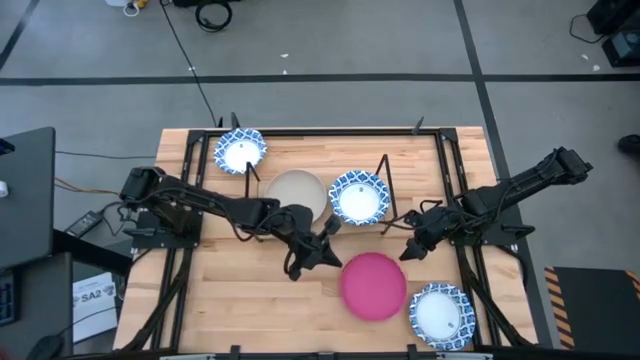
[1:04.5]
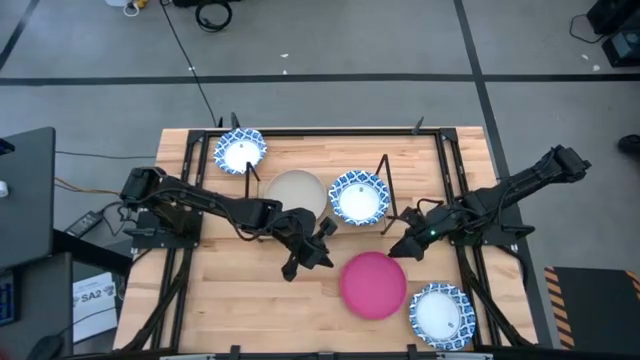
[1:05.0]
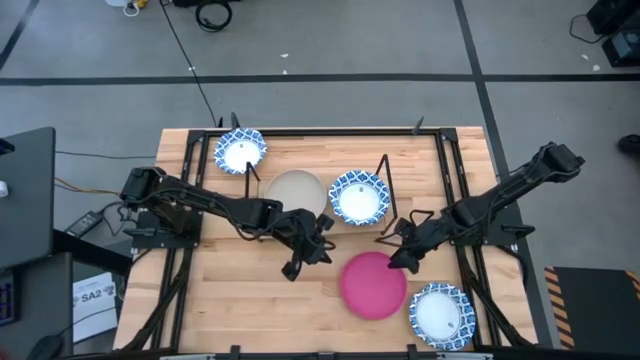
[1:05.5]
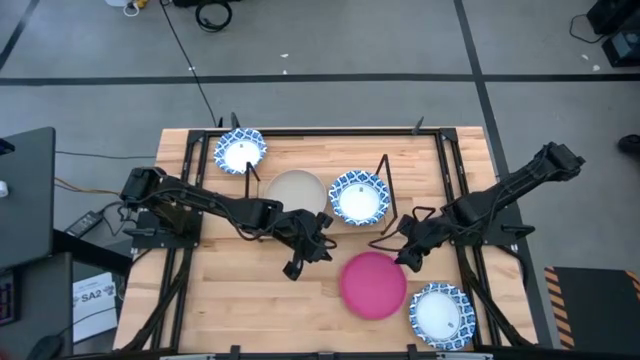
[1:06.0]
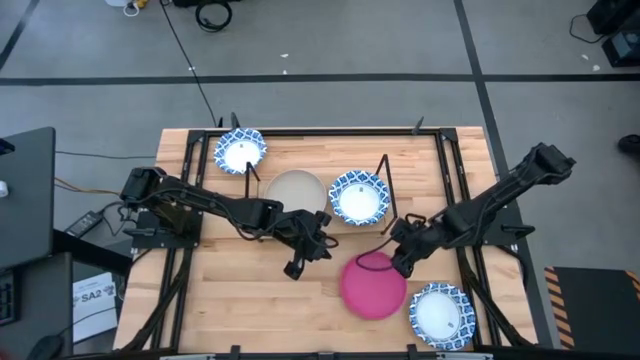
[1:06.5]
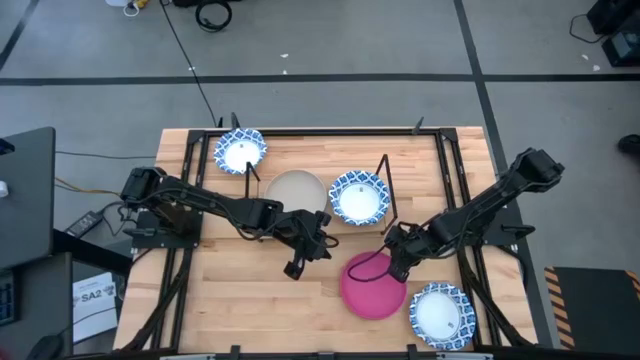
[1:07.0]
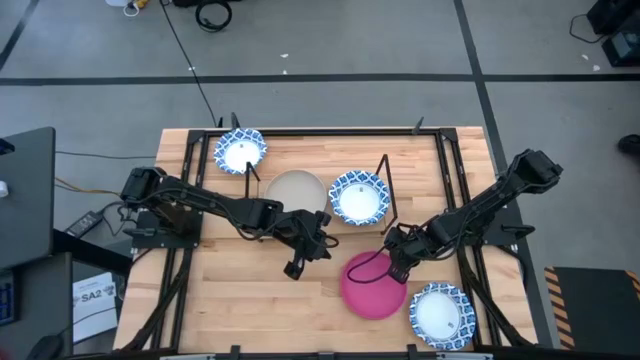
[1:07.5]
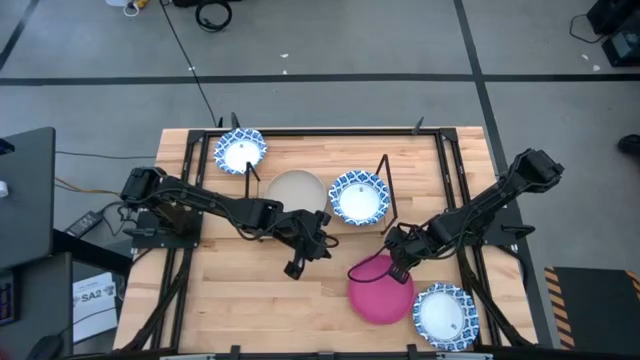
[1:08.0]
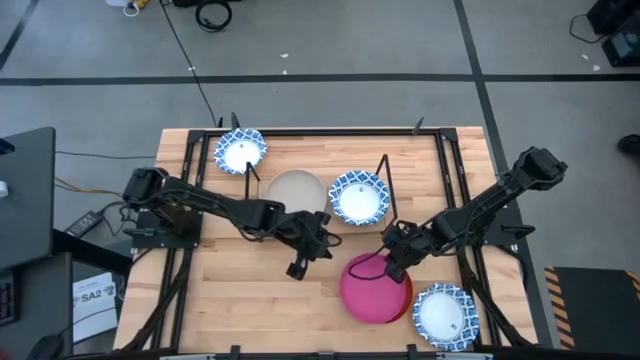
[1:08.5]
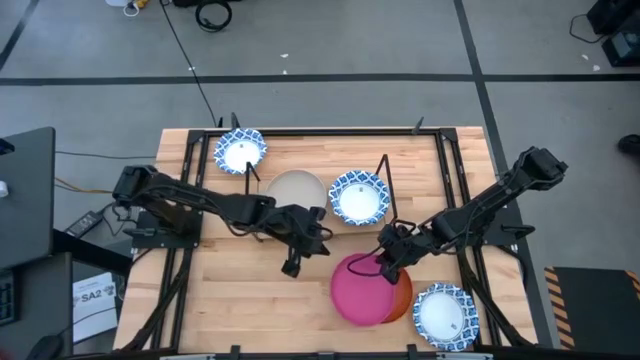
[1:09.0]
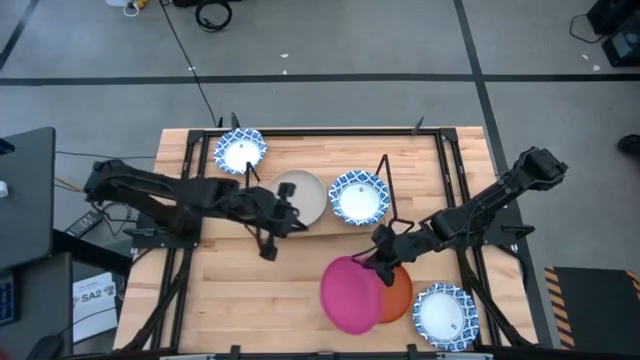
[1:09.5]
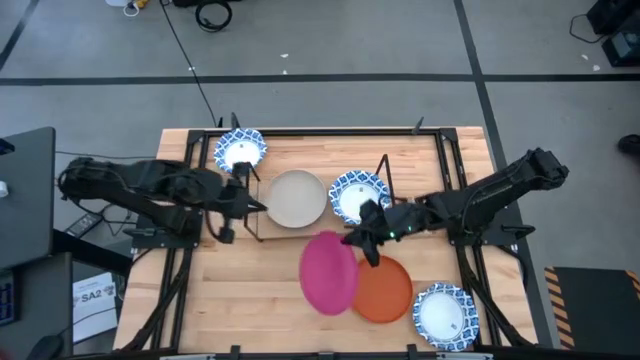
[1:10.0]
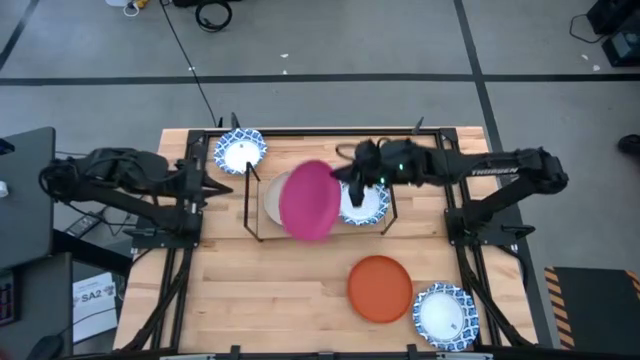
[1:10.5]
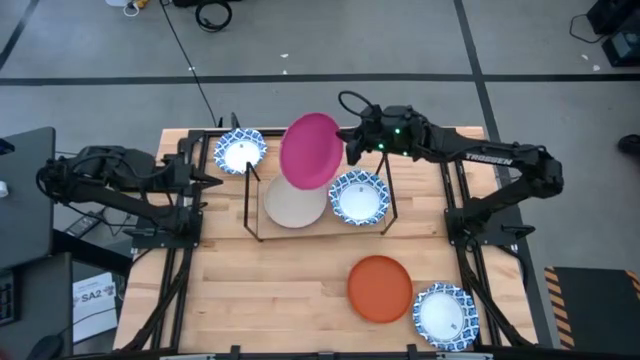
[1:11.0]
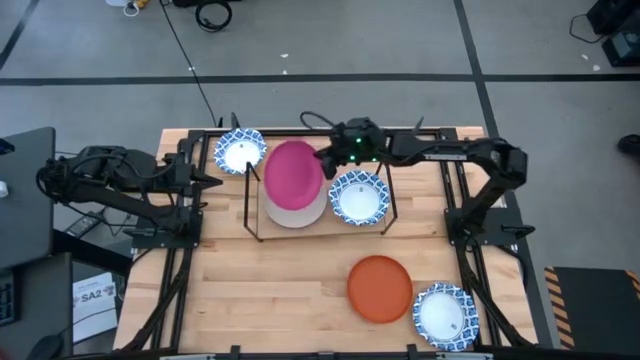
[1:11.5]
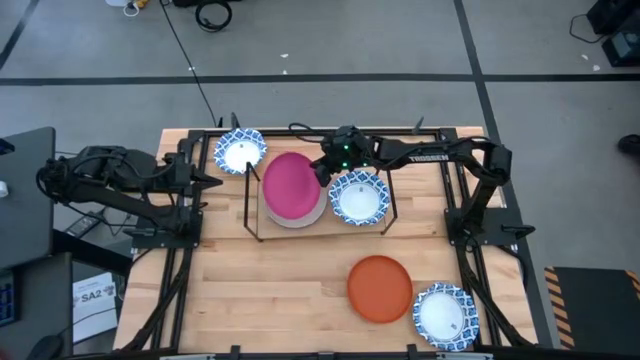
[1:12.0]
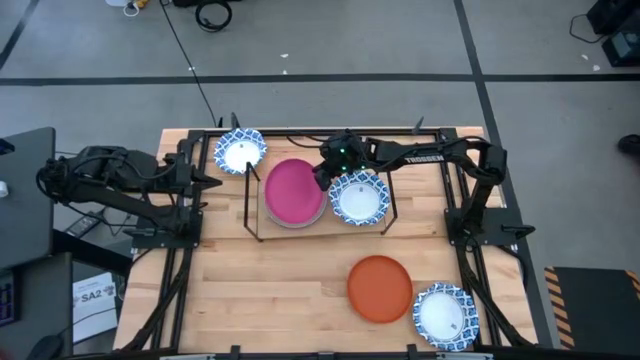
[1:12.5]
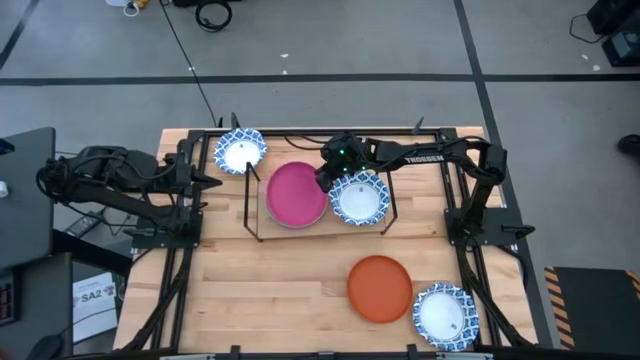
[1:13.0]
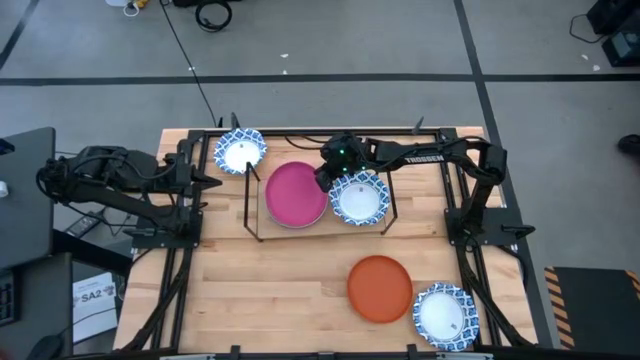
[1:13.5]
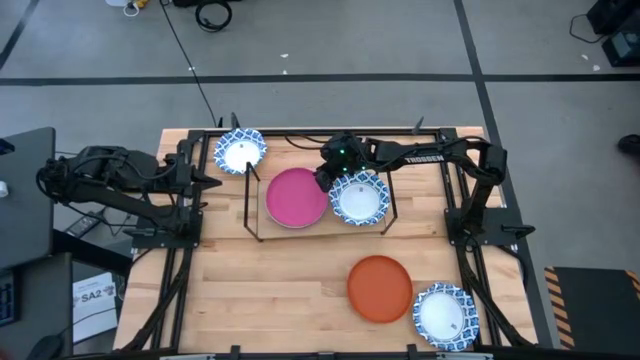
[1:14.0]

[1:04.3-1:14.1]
Task: Place and stack plates onto a shelf
Stack the pink plate on top of the gray plate on the shelf

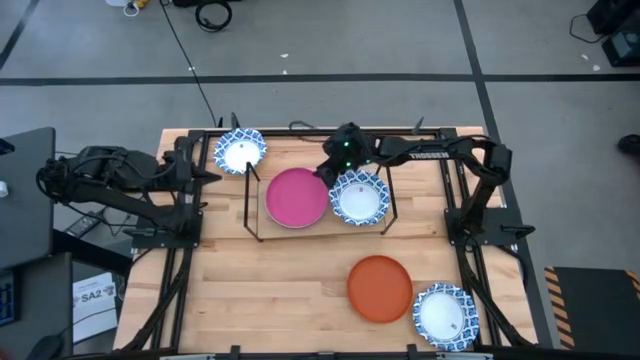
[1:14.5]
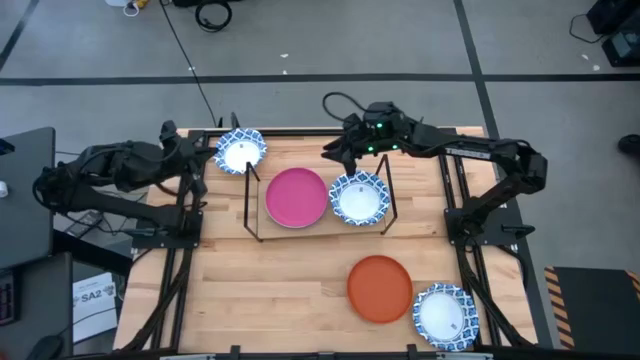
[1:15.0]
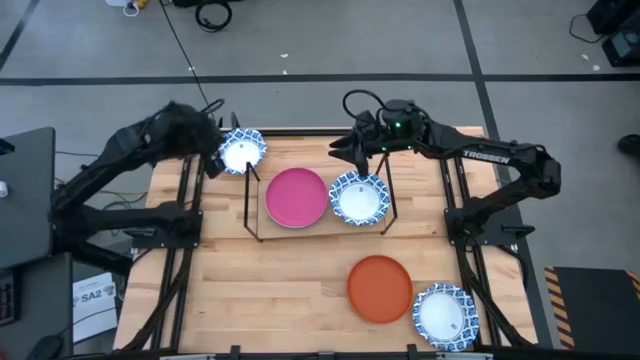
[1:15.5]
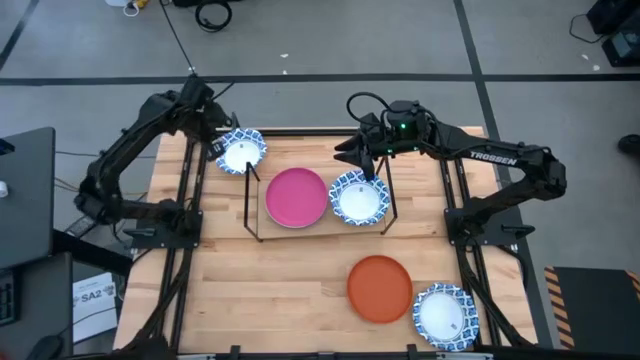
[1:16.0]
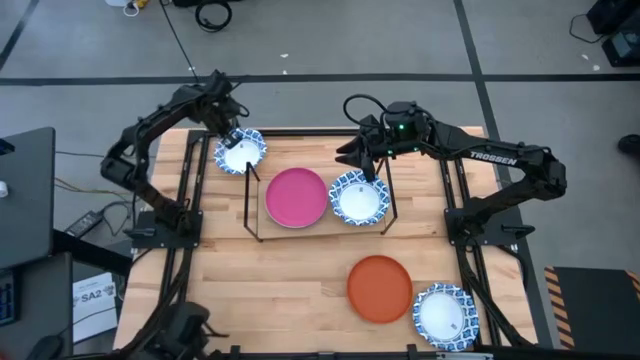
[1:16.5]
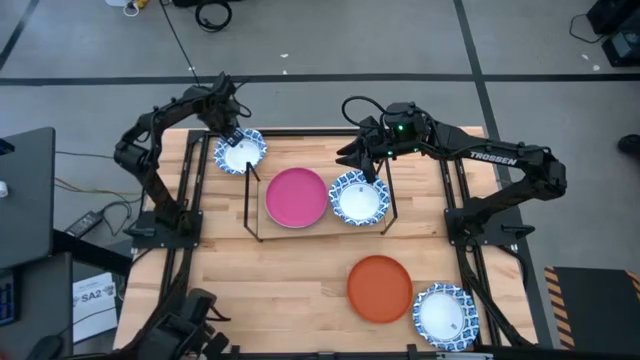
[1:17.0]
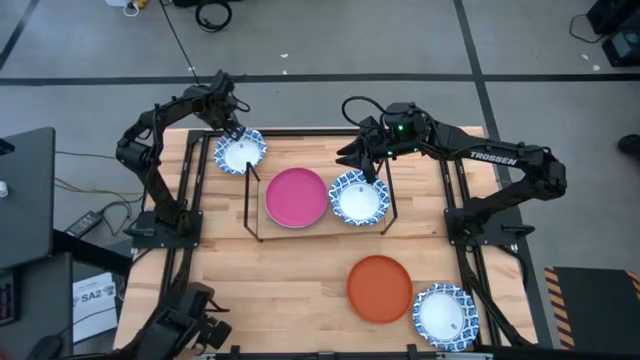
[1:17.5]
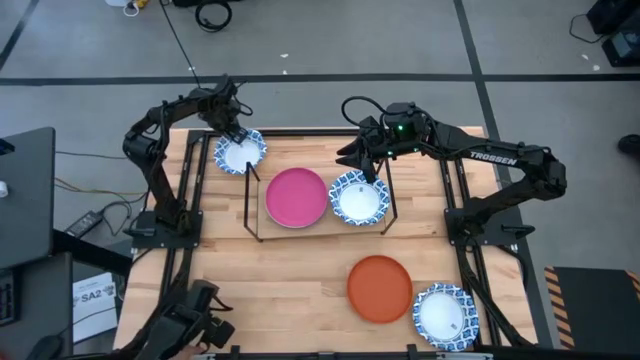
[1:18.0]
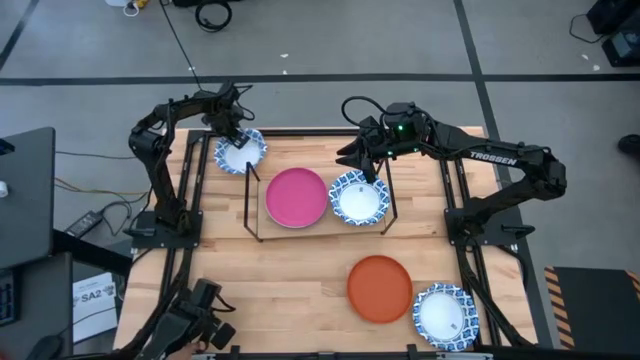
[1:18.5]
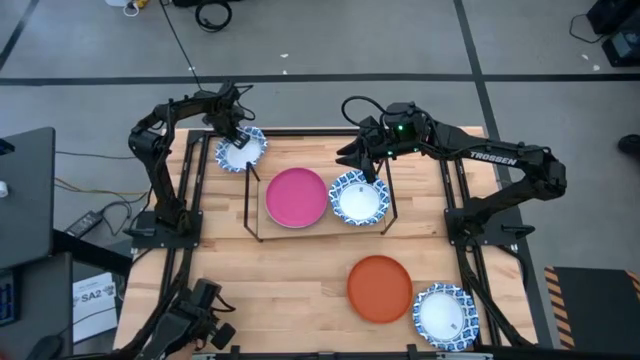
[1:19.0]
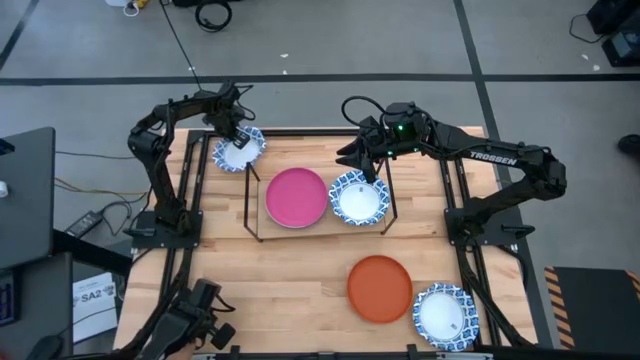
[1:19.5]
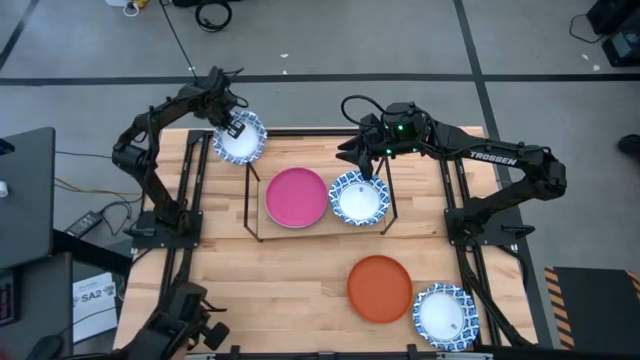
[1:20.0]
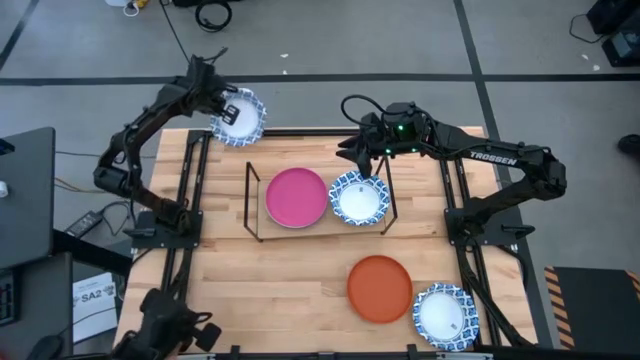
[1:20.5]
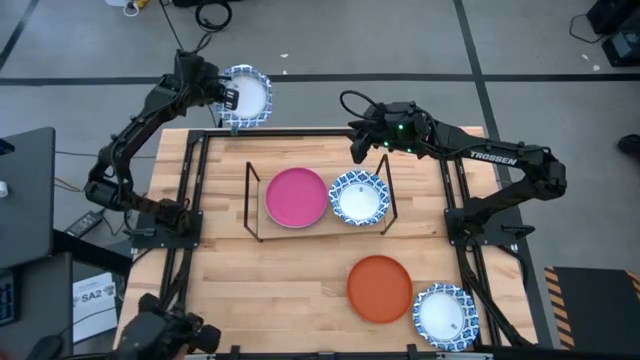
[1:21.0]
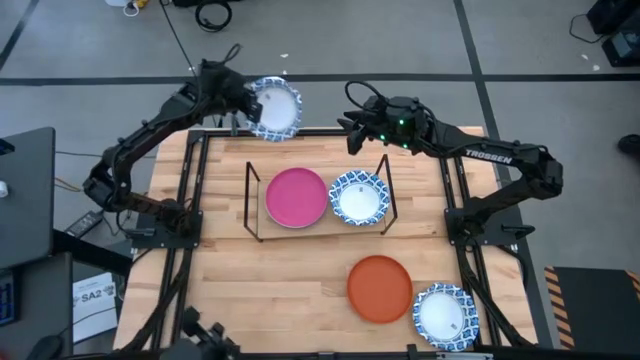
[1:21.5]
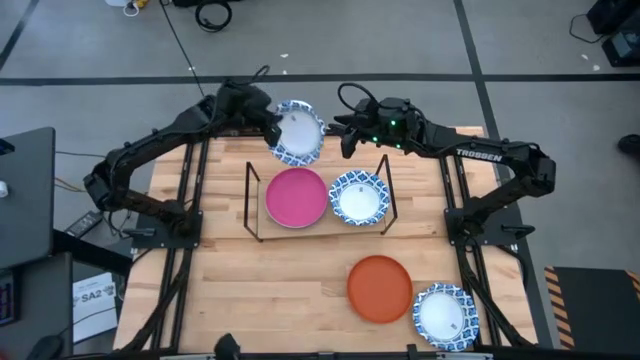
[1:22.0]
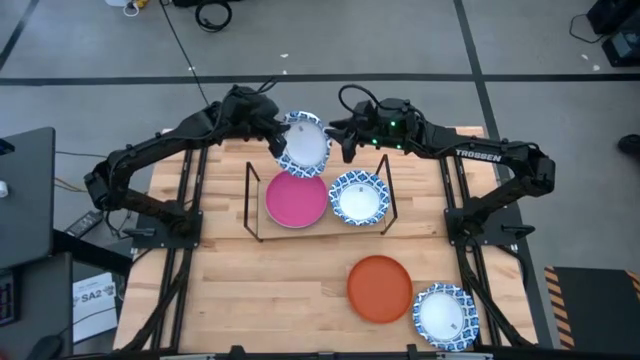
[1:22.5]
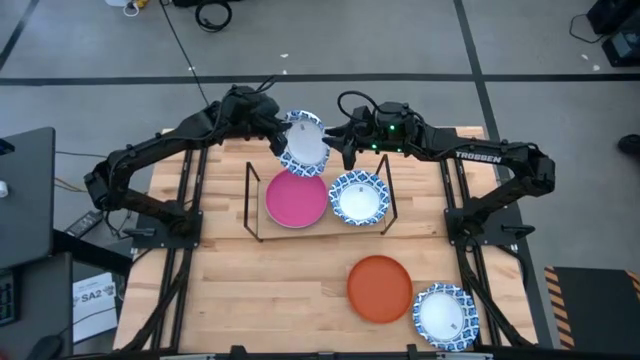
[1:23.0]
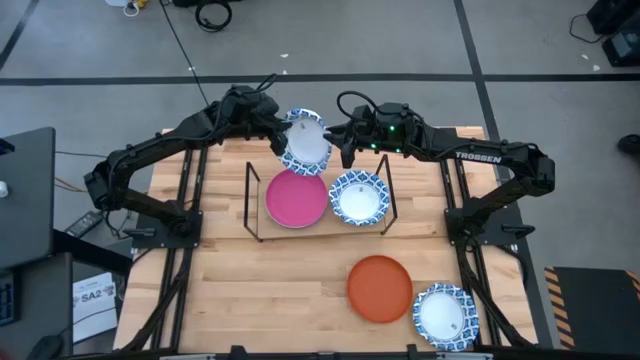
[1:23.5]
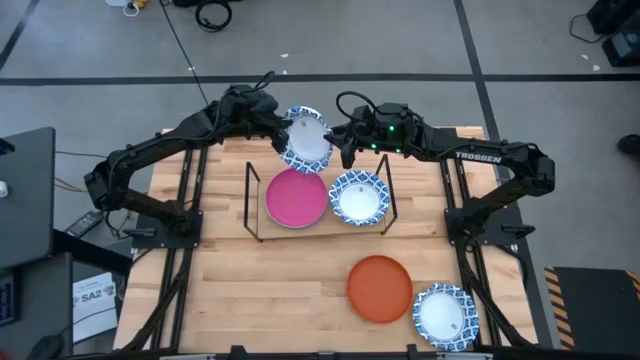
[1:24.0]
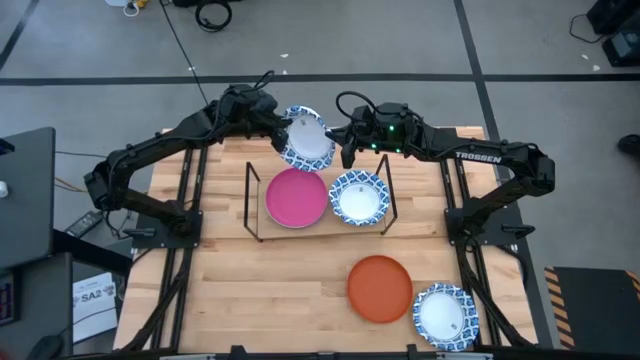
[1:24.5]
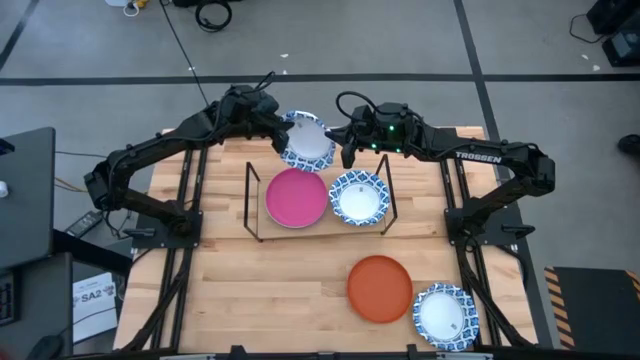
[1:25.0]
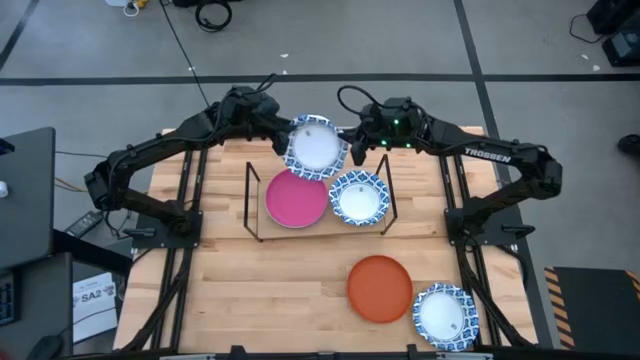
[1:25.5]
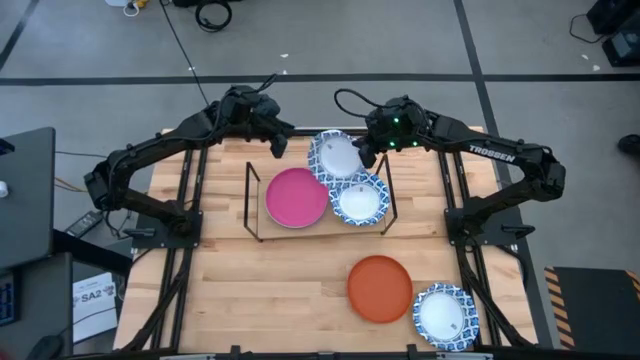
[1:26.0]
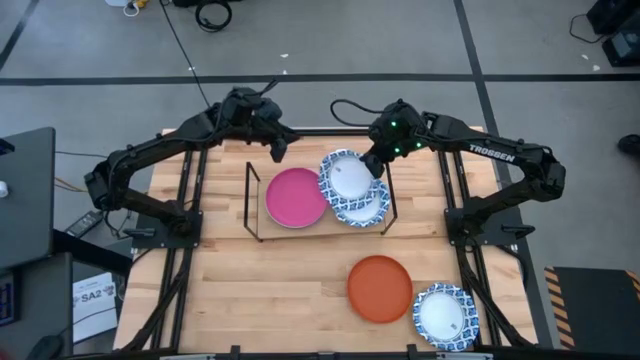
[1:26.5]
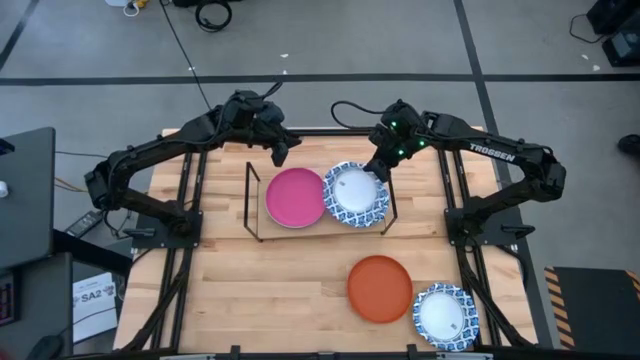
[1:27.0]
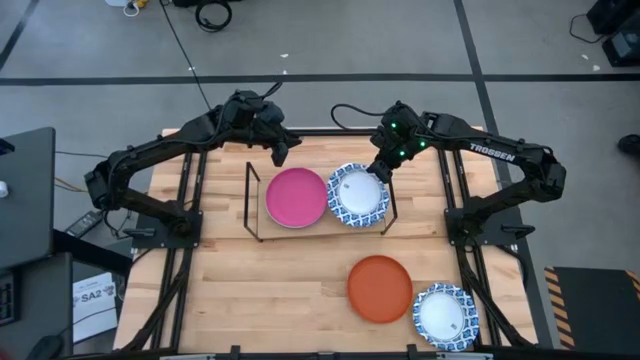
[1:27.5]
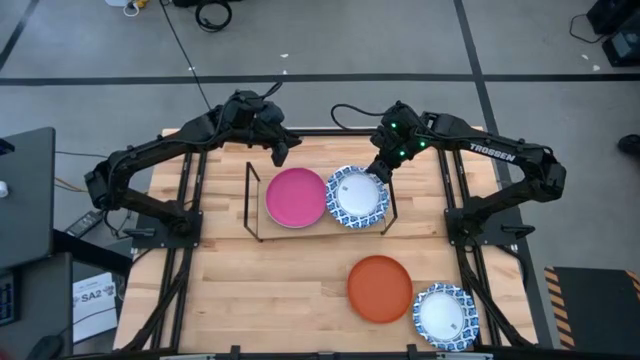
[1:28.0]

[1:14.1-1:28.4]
Stack the white and blue patterned bowl on top of the white and blue patterned bowl on the shelf
